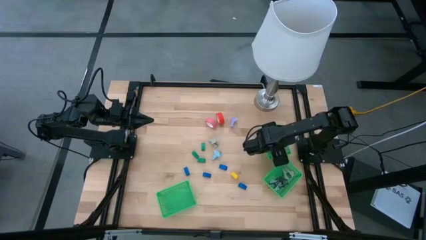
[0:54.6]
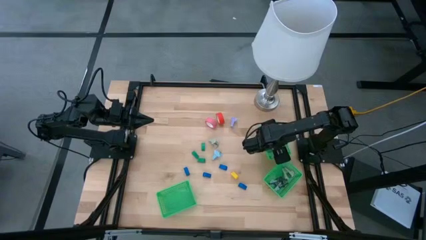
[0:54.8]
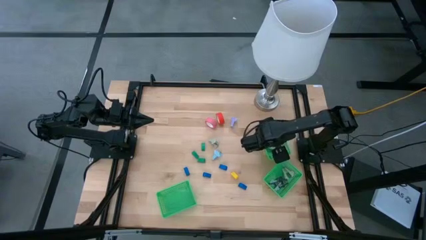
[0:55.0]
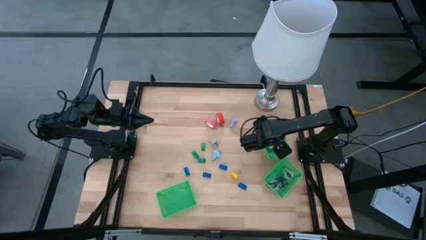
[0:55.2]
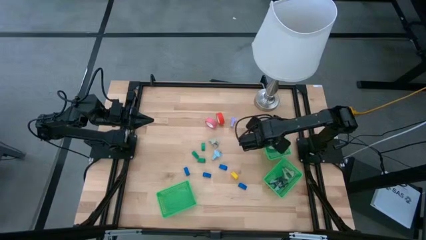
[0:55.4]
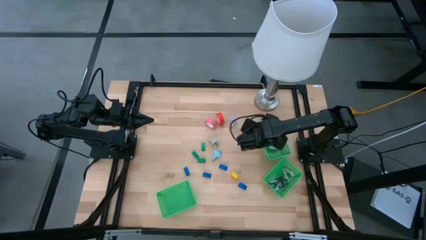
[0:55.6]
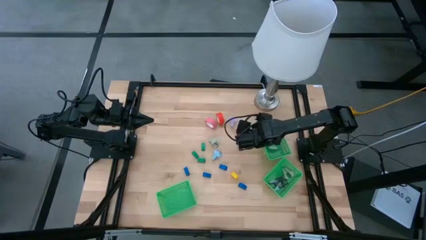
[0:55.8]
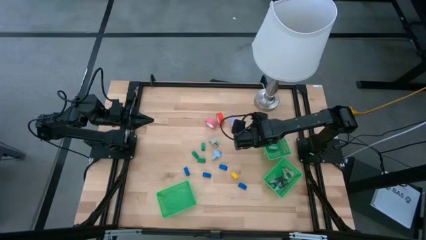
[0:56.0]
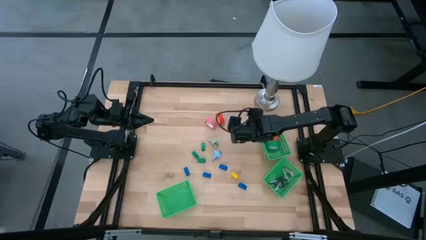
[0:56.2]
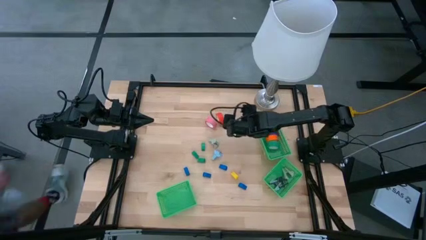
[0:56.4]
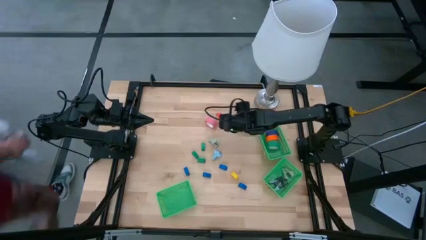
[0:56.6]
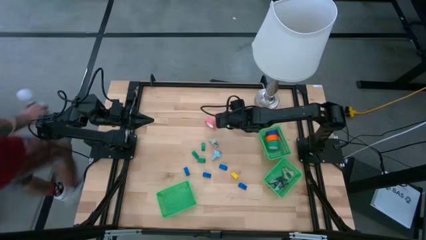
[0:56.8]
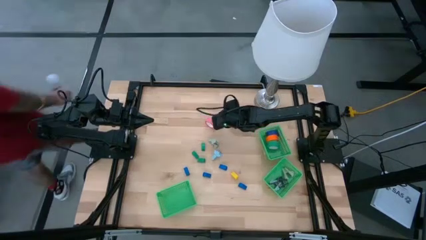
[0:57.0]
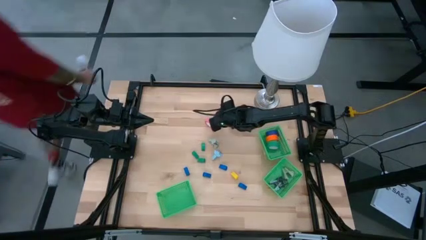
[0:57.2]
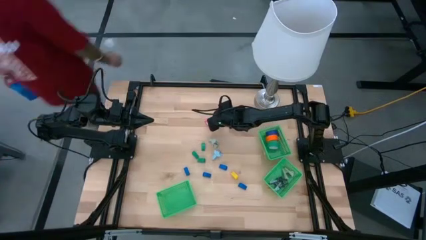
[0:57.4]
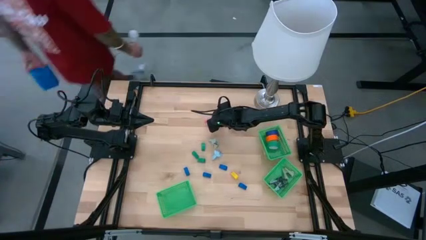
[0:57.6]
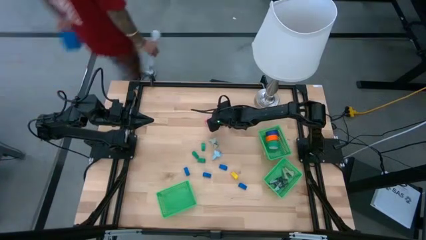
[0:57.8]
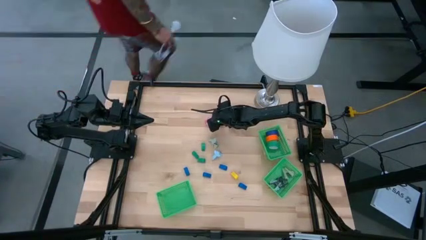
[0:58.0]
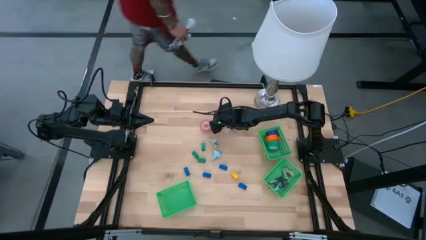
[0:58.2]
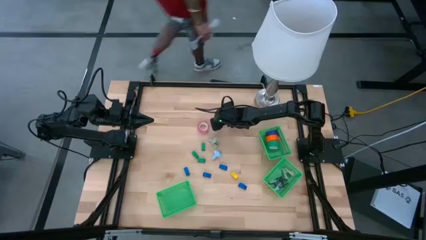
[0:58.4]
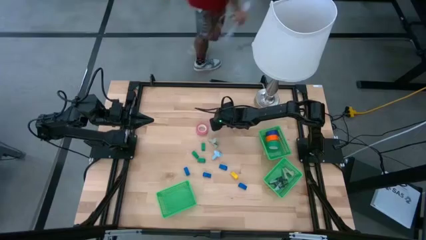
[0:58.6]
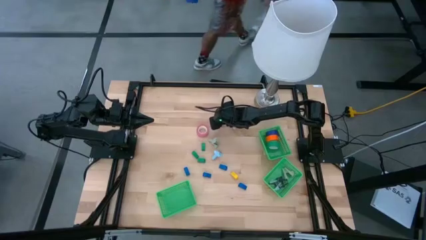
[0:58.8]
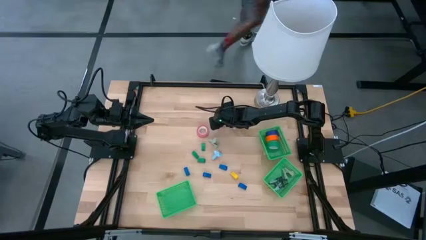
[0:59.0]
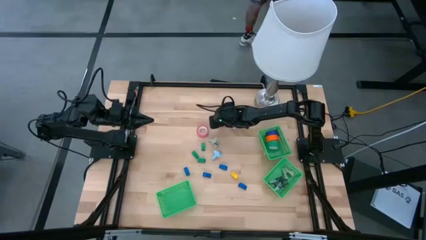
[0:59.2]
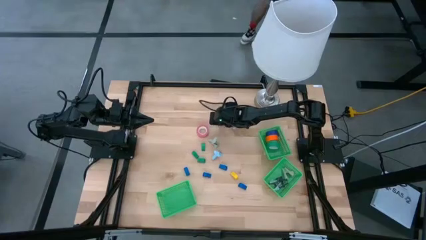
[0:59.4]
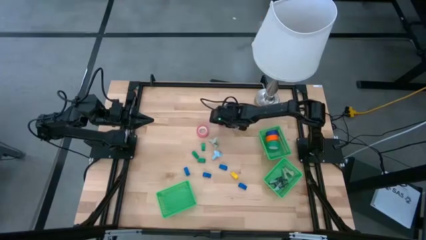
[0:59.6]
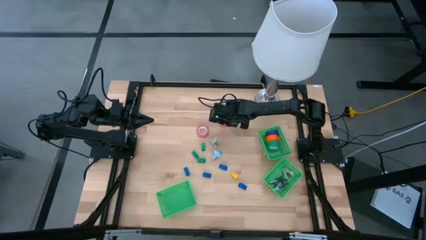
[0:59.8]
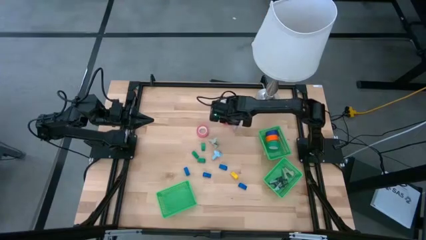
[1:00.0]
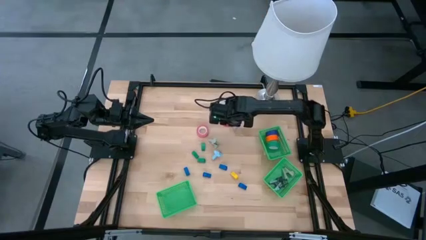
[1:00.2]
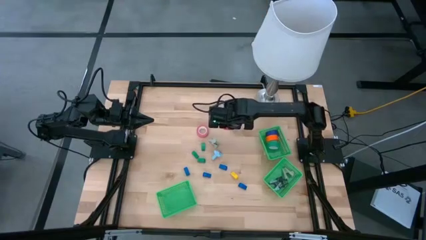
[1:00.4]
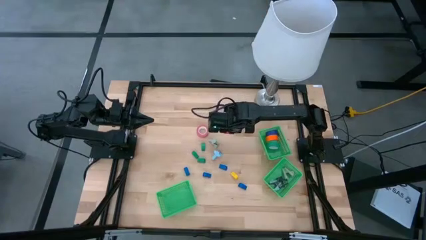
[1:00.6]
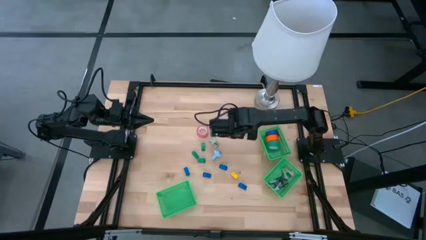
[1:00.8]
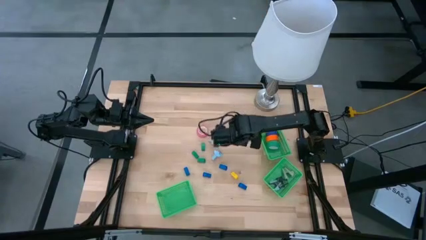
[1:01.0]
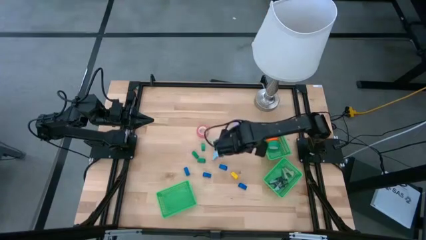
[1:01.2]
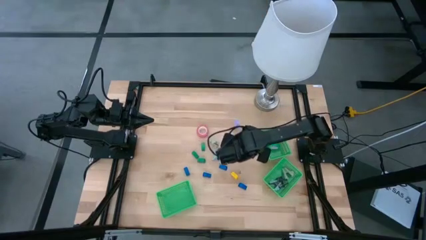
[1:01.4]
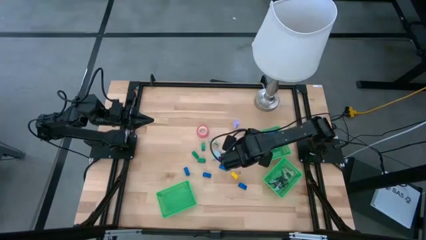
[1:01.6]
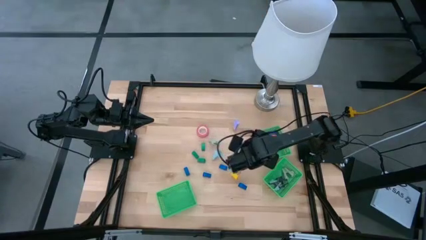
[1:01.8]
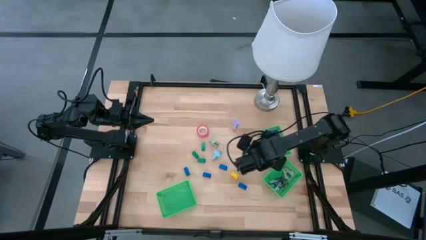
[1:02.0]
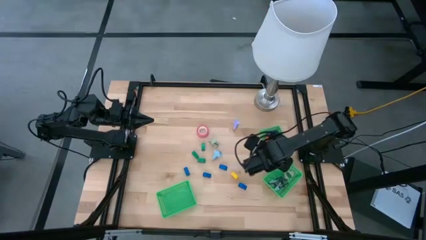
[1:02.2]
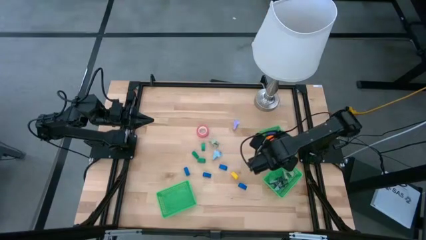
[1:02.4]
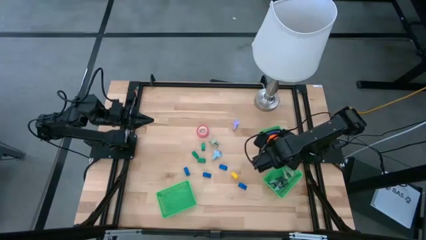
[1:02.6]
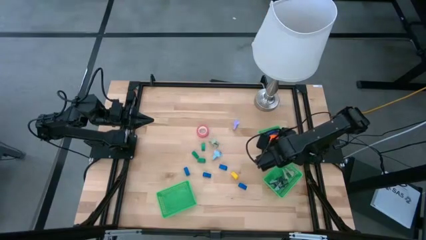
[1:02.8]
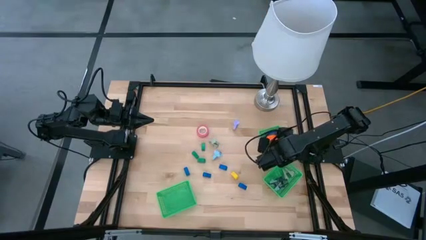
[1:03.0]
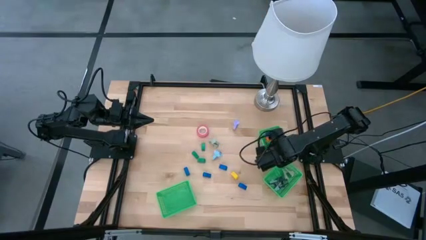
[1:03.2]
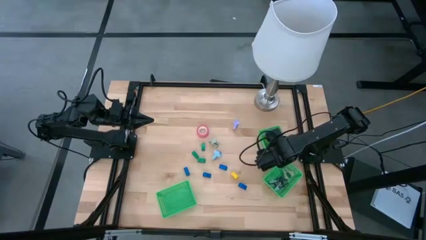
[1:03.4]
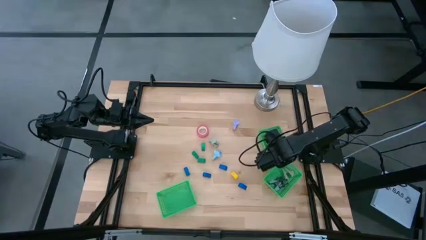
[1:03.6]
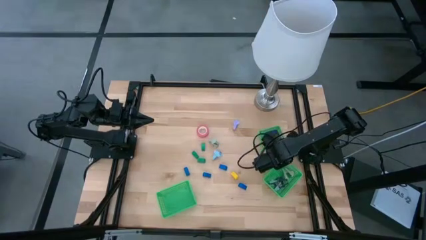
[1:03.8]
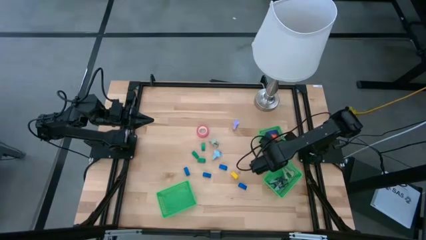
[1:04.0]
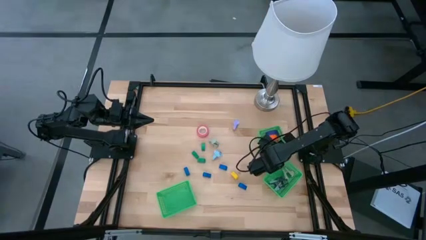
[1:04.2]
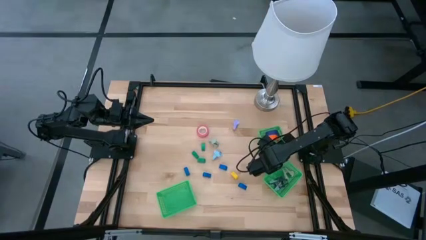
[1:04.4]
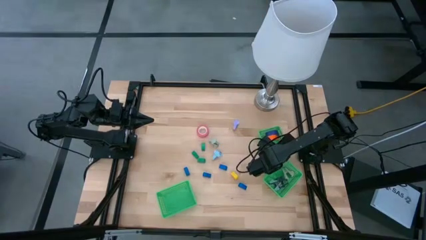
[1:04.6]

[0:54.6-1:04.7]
Task: Pick and place Stapler, Stapler remover, tape
Put the red tape into the top right green bin

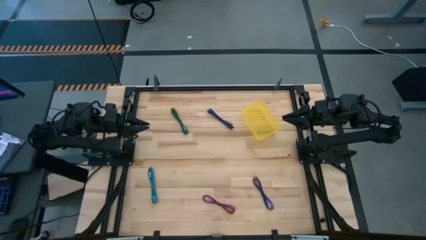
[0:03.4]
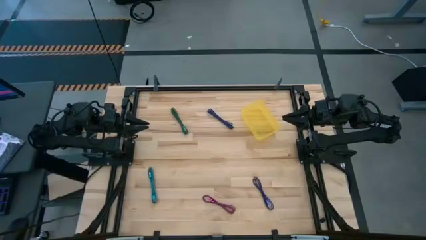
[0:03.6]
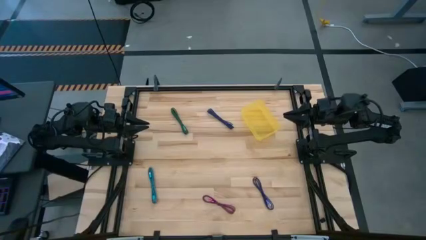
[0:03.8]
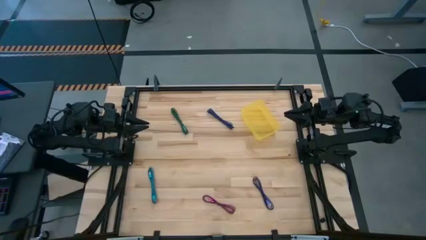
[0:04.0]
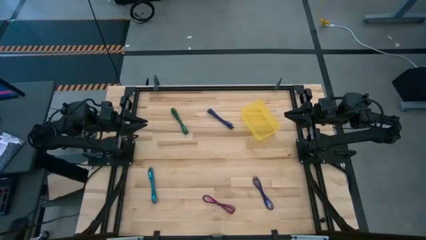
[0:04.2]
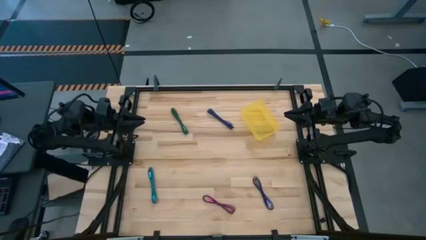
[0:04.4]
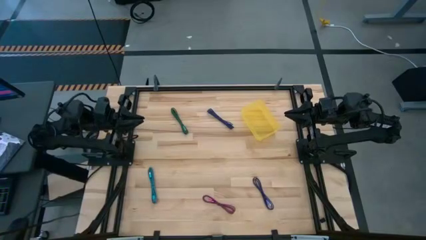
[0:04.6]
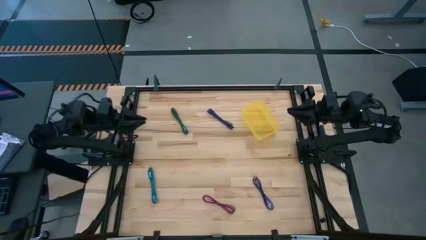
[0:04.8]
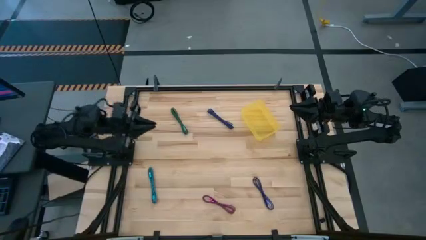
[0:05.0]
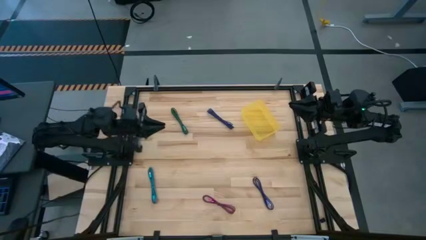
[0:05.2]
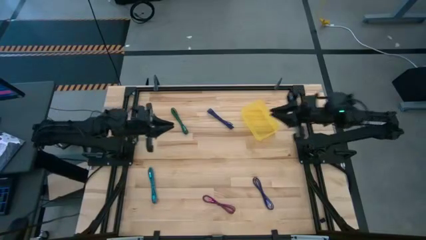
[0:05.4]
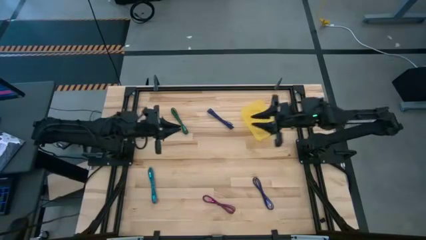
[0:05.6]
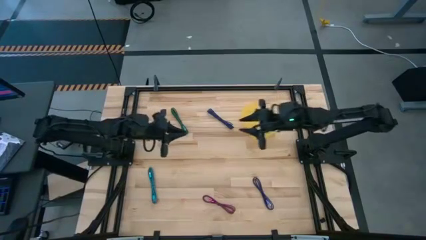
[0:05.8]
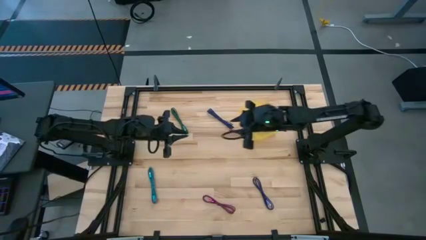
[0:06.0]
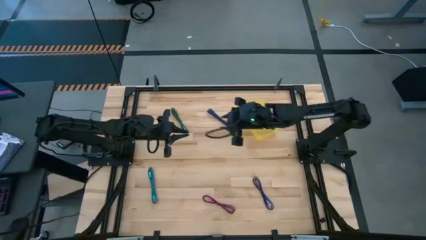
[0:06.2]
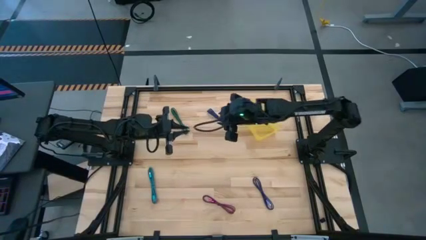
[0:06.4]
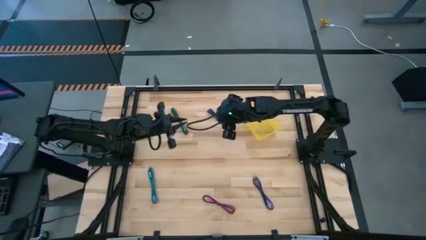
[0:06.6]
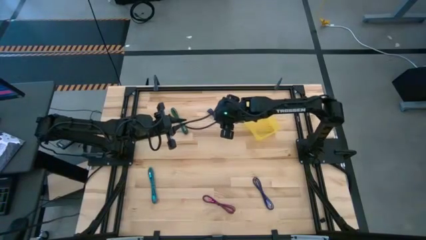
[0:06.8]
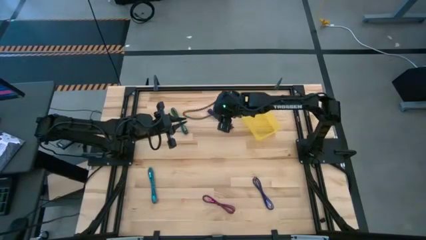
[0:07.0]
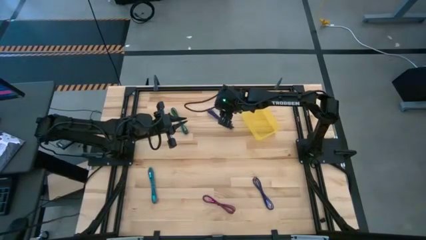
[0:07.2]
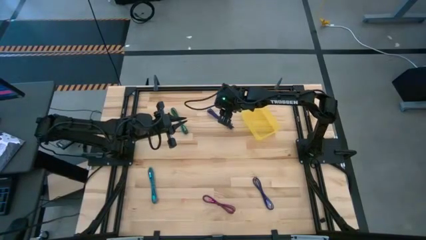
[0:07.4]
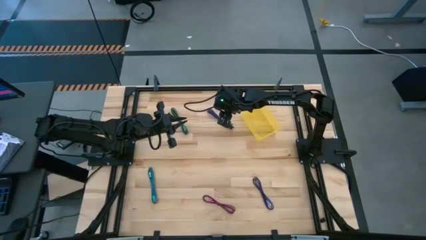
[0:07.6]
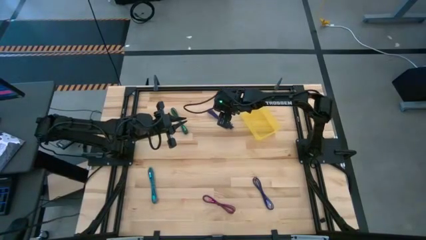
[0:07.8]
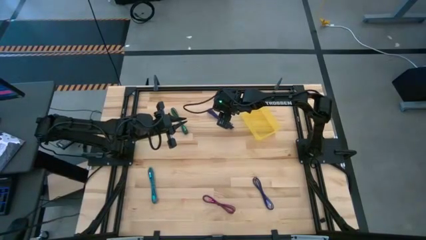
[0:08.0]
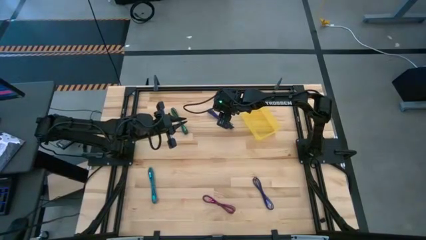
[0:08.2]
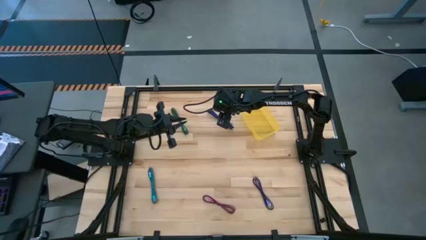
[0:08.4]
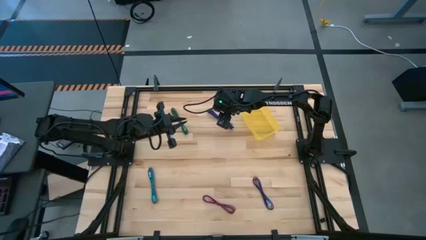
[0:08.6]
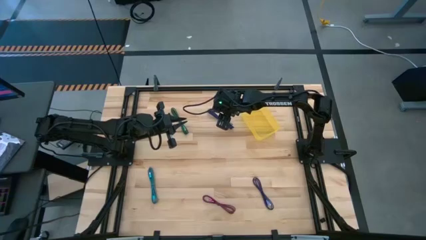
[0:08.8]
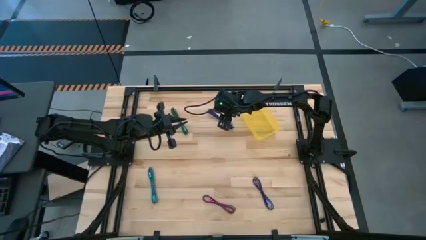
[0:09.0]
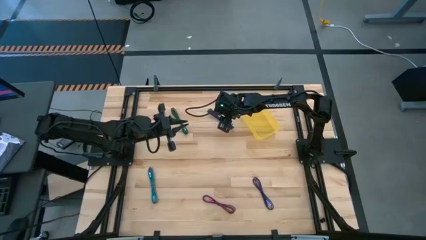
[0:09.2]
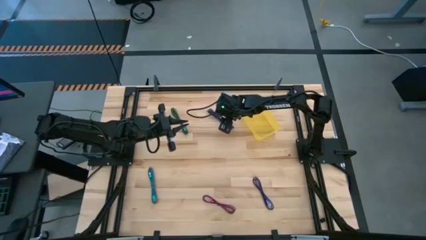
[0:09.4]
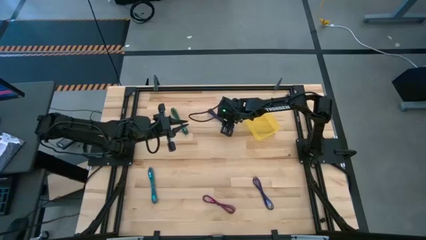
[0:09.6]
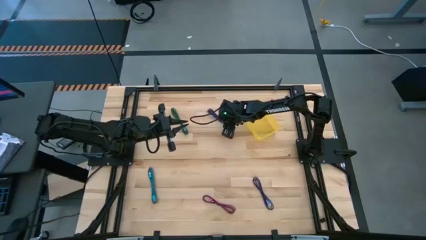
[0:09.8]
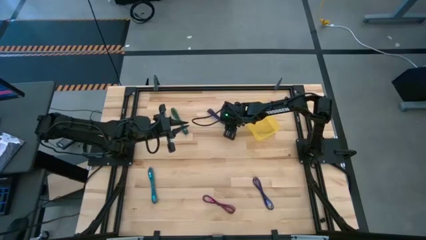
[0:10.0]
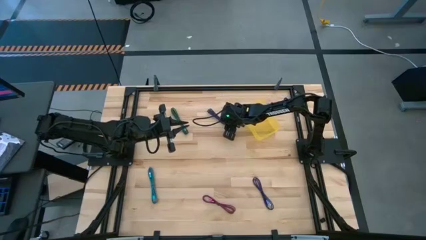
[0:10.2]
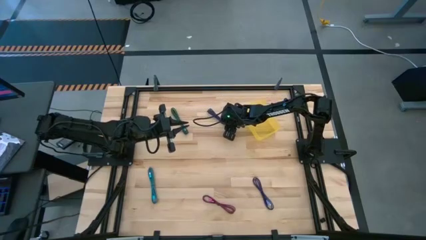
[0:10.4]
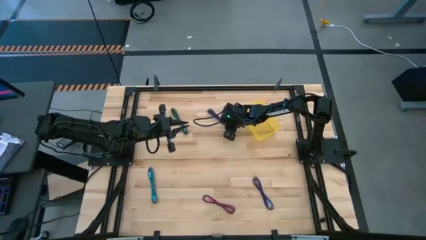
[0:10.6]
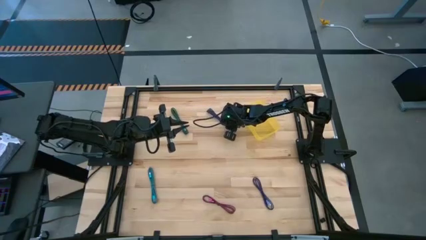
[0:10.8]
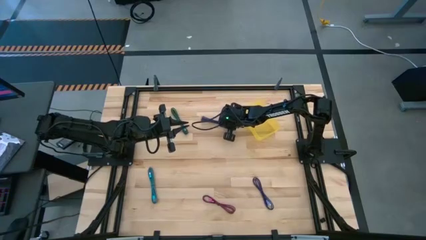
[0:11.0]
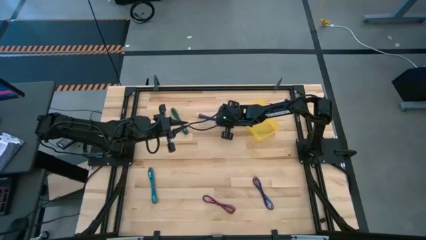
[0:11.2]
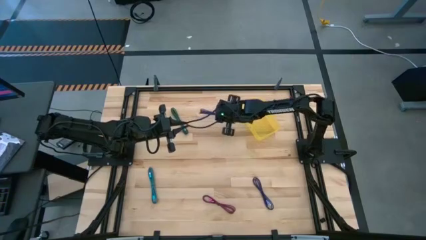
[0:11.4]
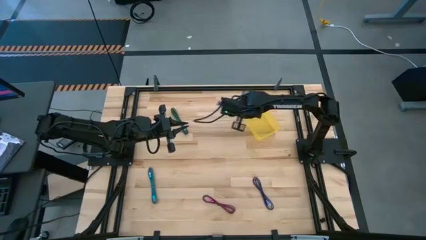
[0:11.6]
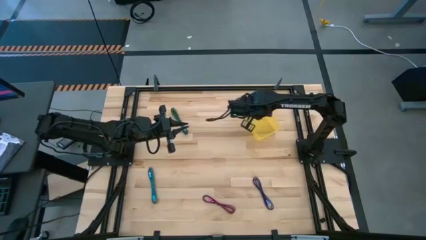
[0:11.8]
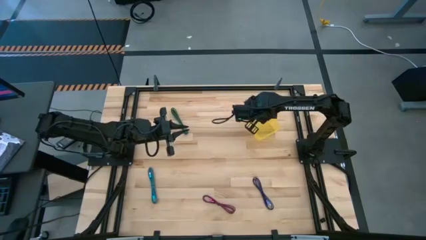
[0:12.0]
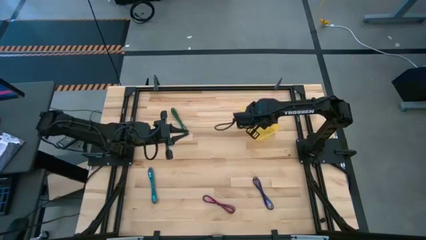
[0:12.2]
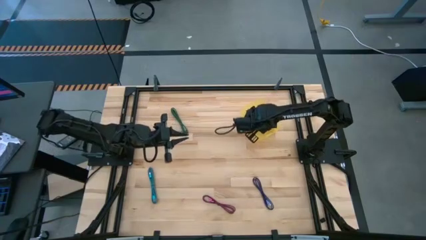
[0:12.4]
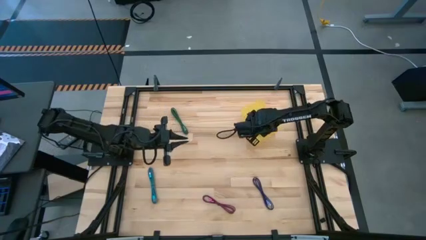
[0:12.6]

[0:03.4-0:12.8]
Task: Pick and place USB-C Cables
Put the top purple and black charger cable into the yellow bin
